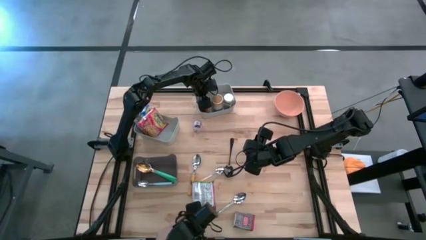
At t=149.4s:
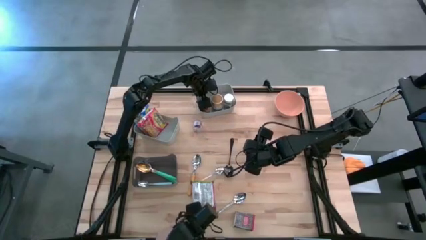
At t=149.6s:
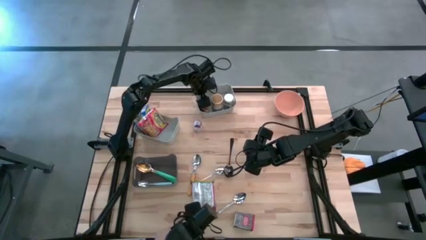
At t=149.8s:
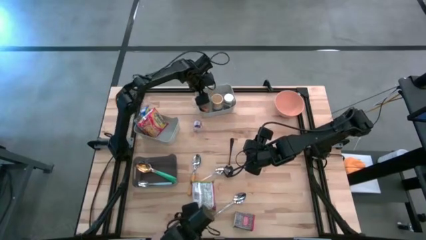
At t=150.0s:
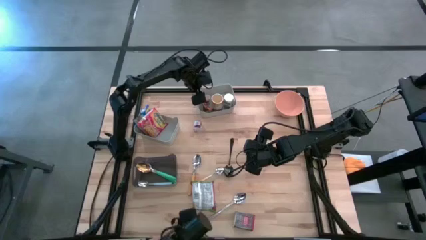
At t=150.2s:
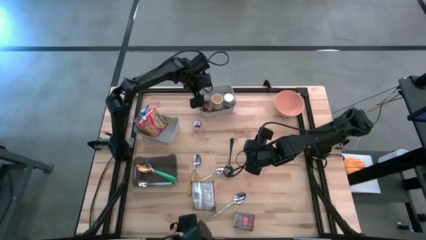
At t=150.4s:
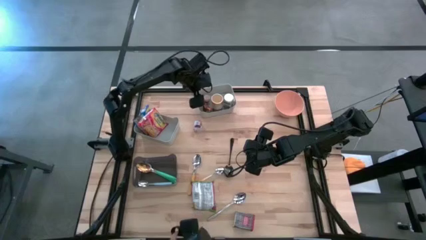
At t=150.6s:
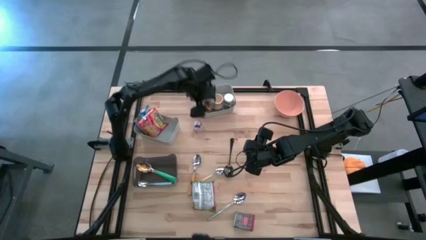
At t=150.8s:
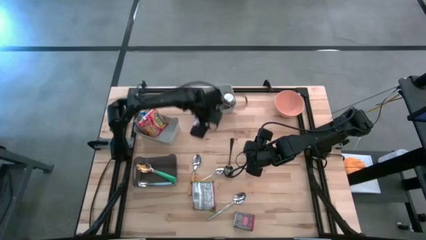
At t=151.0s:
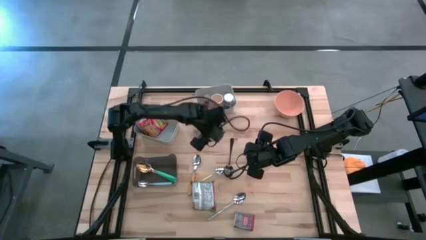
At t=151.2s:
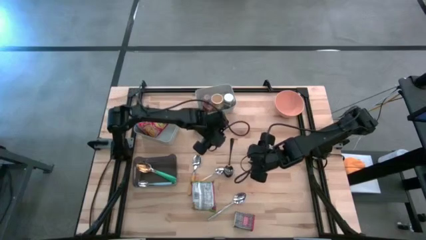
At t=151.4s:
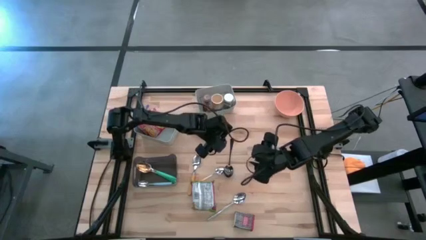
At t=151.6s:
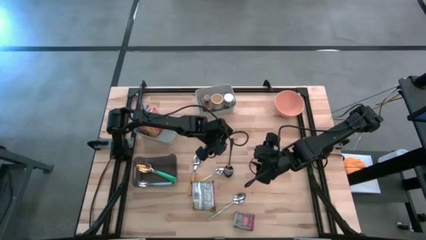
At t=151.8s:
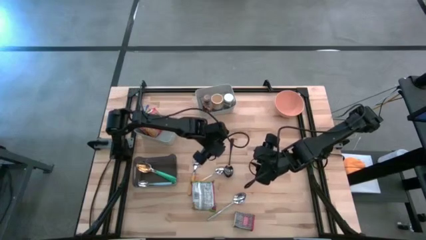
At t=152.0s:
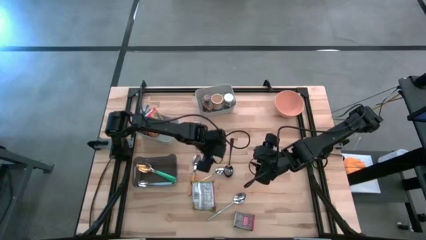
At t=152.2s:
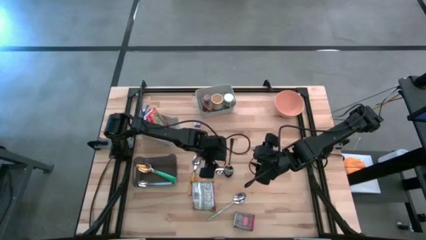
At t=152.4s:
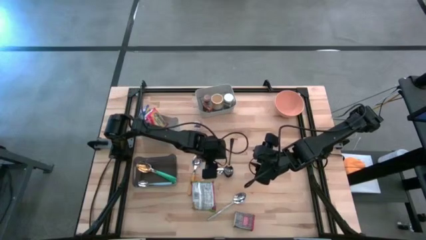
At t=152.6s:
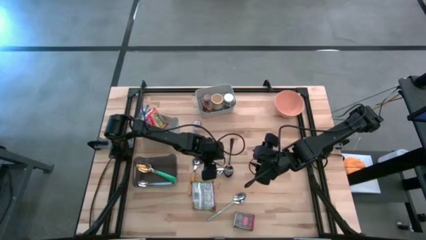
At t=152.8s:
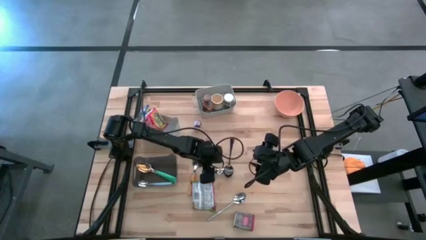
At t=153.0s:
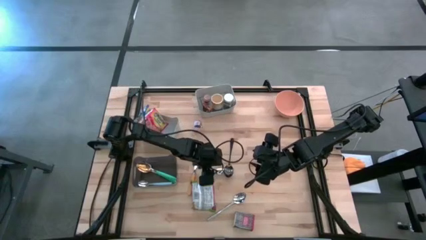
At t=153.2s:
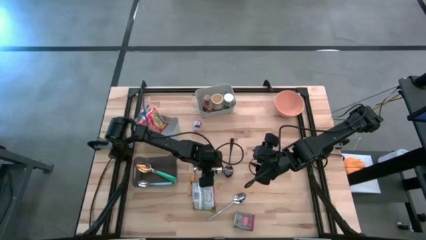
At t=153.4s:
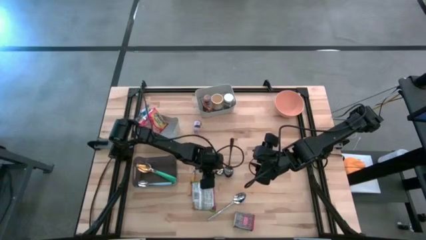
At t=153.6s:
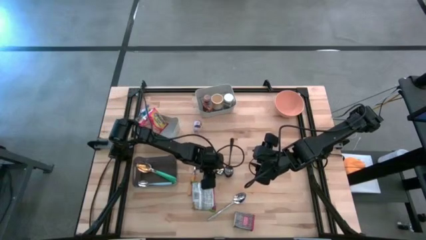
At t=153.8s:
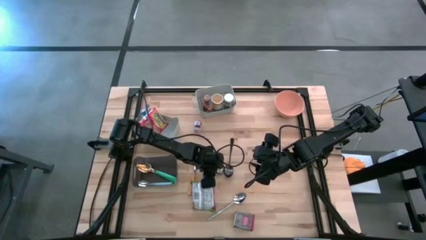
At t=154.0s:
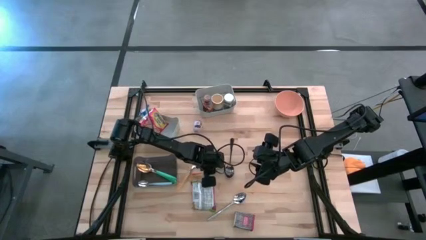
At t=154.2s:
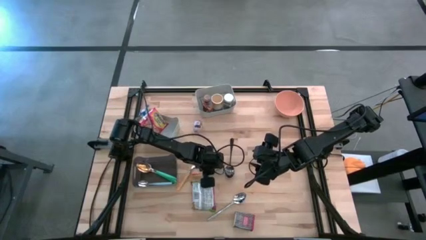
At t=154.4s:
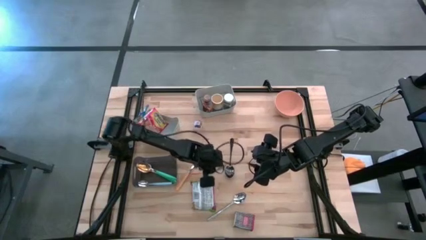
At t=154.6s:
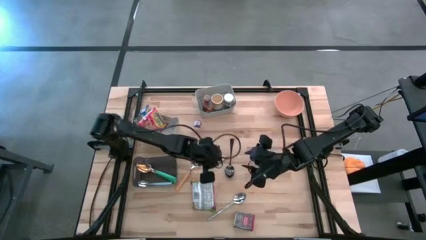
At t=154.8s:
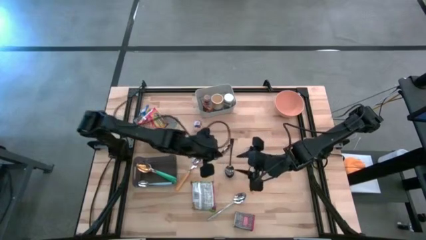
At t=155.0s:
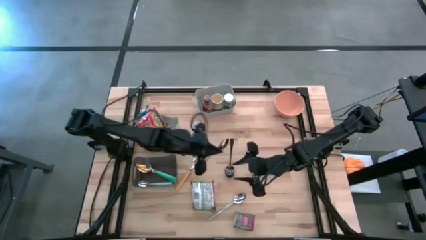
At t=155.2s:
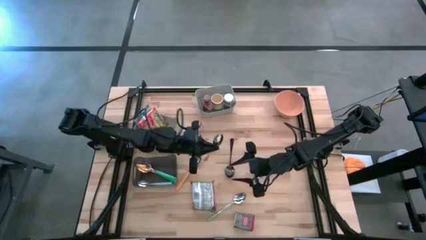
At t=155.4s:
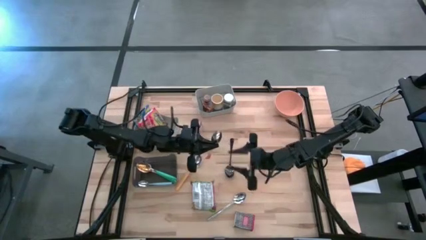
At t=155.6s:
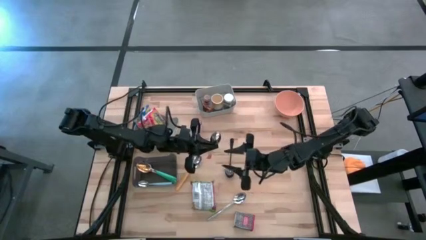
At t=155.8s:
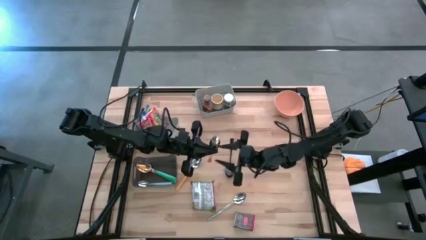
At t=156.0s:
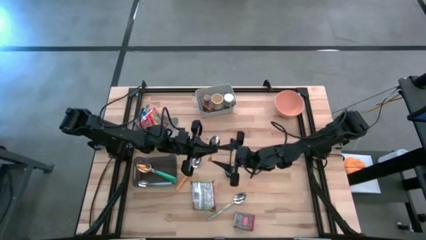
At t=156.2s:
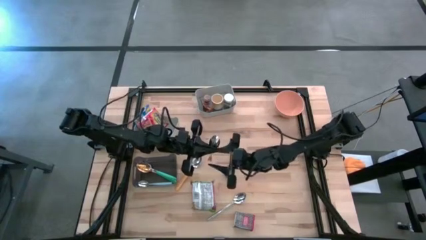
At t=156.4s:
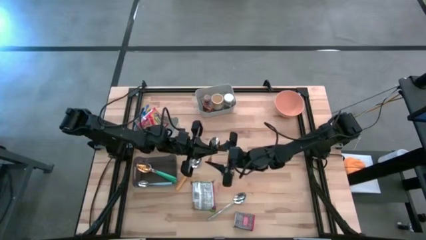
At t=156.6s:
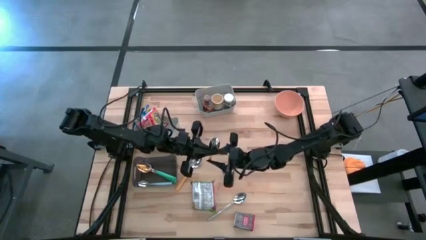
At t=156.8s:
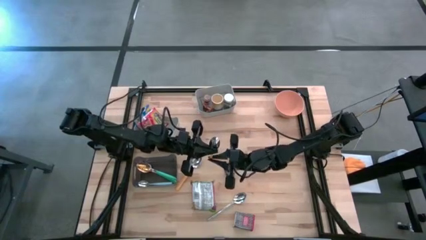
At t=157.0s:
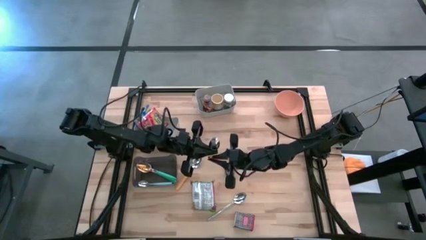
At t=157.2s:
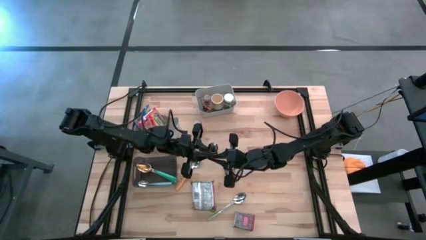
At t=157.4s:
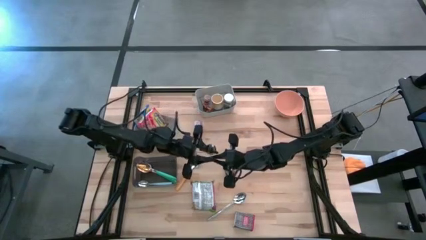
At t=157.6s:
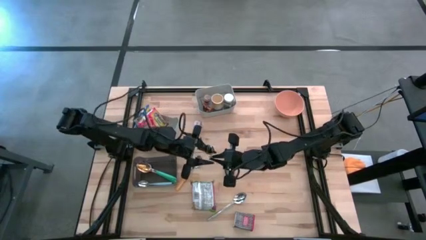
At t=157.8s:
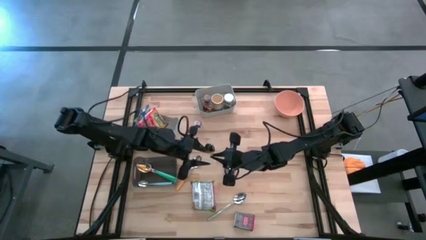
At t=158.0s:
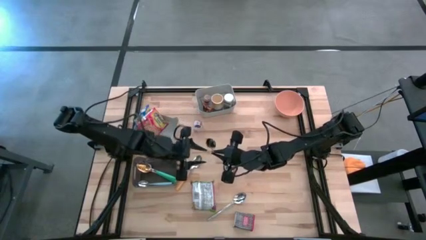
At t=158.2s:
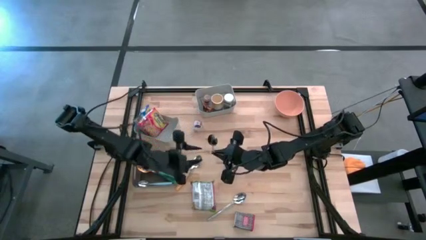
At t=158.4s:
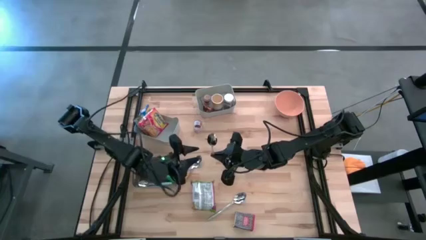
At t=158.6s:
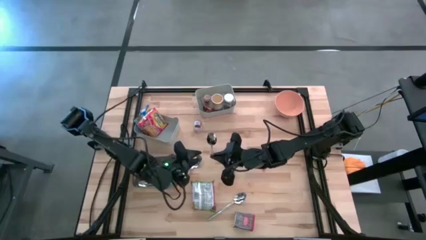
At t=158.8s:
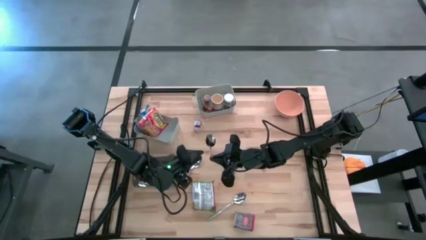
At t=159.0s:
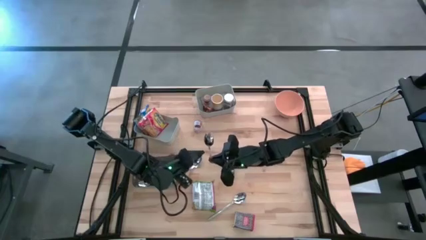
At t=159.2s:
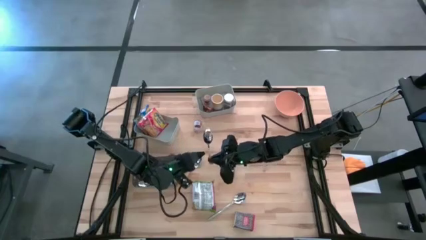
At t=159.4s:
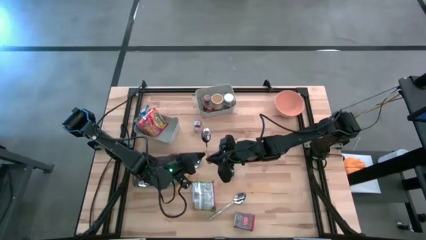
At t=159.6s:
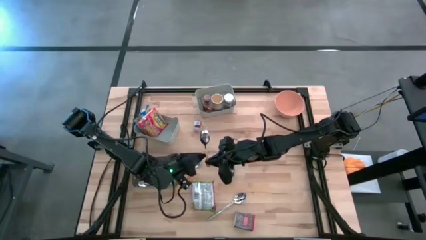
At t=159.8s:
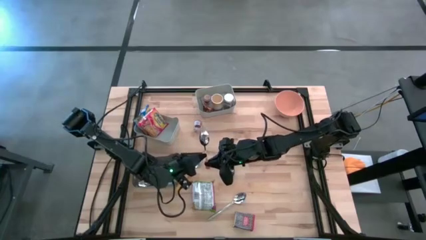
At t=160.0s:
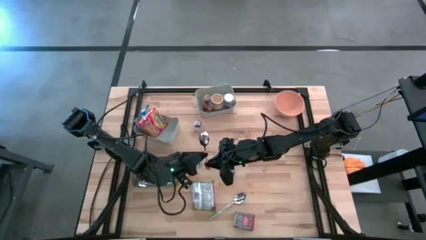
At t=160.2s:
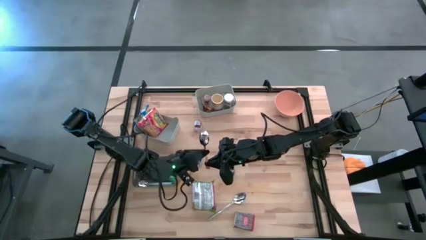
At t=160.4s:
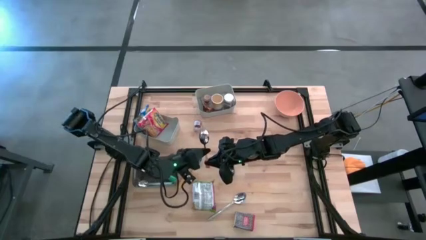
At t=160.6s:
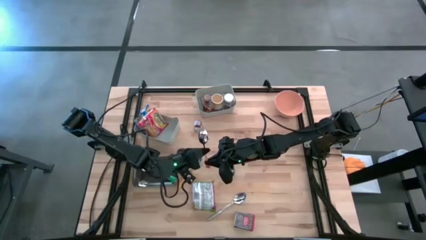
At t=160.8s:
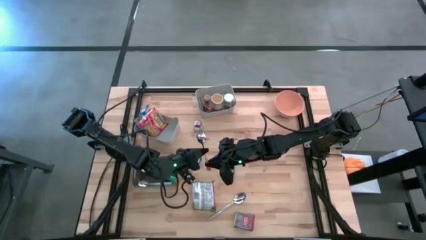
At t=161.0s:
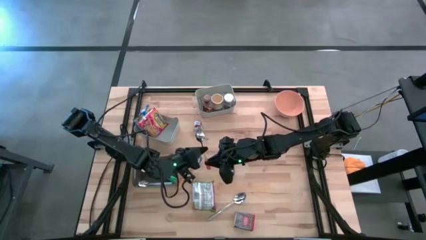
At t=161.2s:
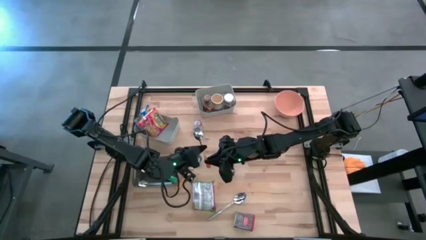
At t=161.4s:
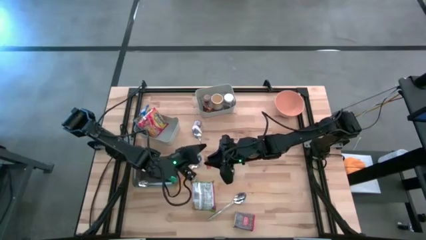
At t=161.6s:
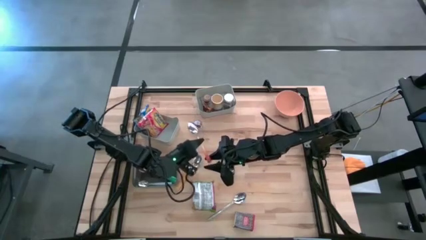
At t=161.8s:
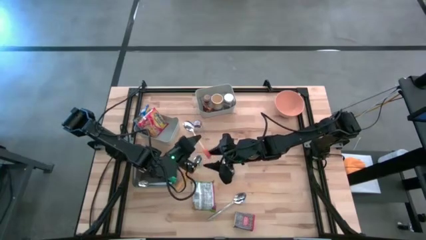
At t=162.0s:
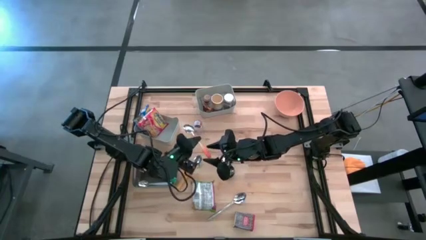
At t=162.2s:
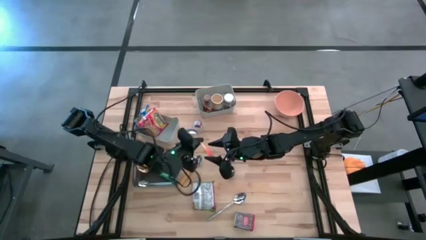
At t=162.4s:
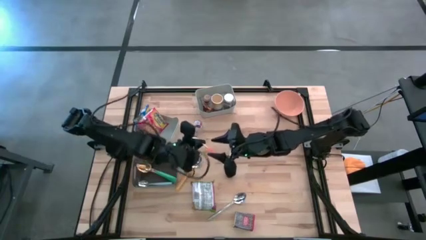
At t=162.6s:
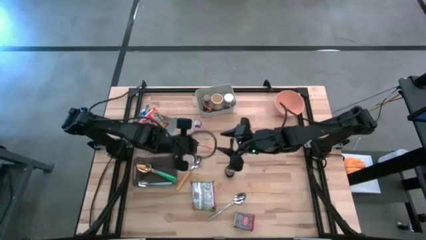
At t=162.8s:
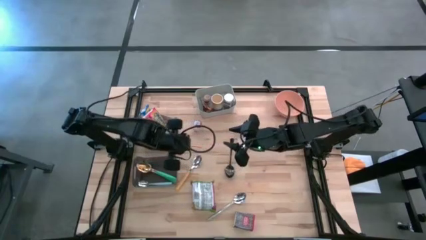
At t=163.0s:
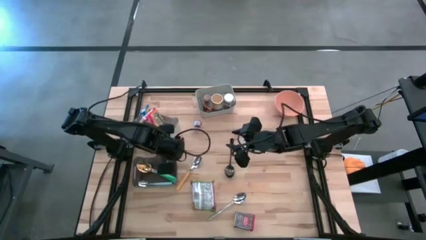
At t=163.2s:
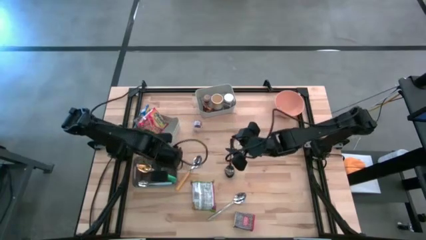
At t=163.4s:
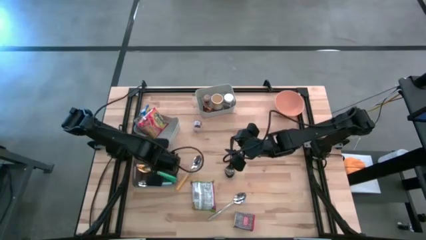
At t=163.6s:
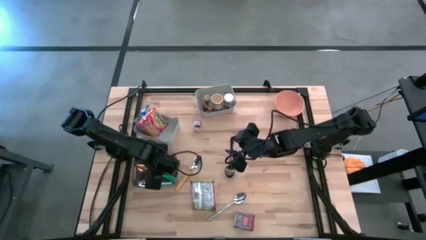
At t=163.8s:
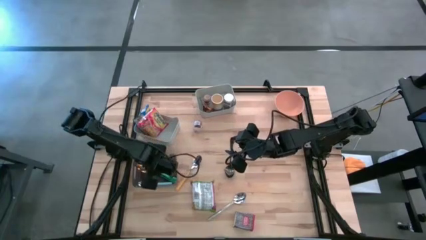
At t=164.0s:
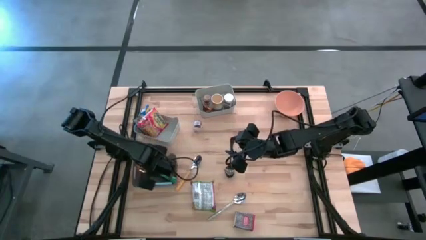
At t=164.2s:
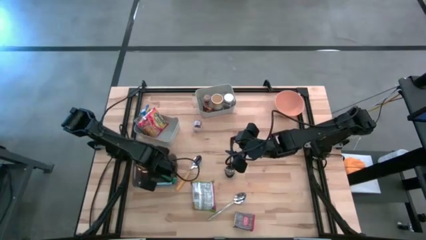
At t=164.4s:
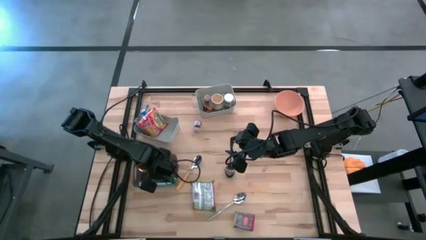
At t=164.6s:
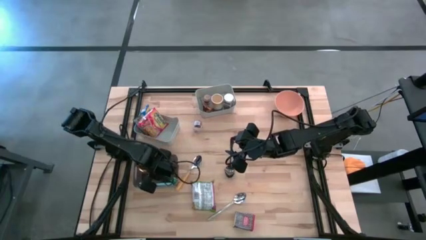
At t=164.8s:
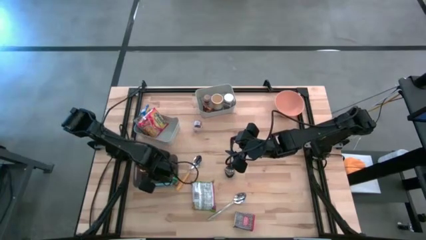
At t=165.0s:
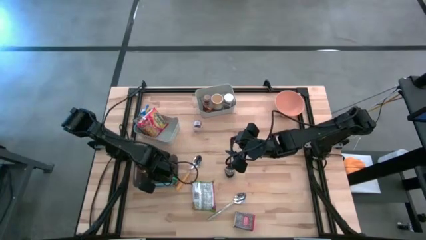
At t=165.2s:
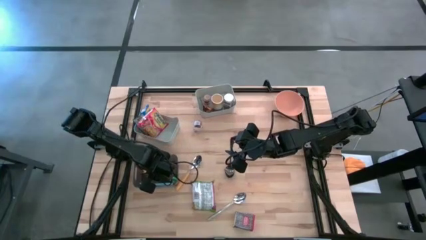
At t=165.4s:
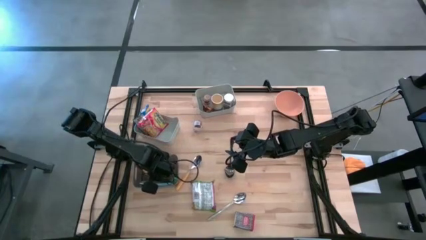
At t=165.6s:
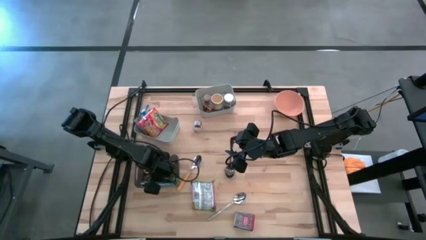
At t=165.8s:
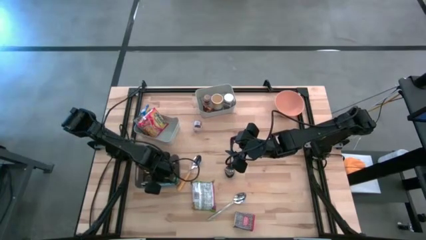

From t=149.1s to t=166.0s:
Put the orange spoon into the black bin
